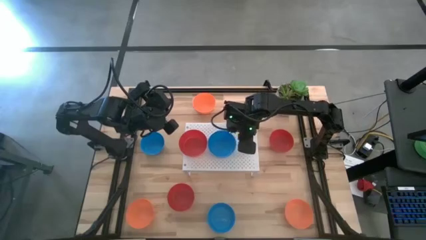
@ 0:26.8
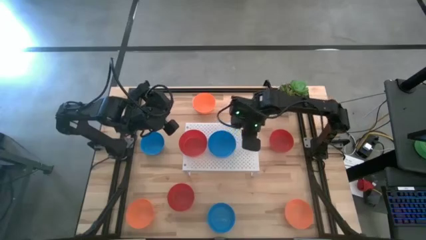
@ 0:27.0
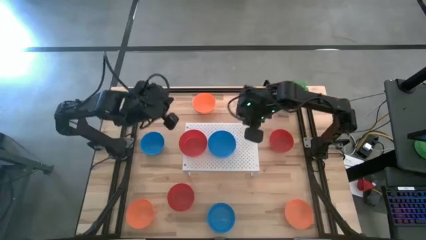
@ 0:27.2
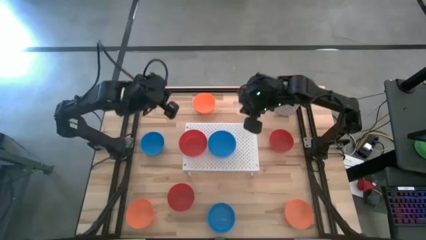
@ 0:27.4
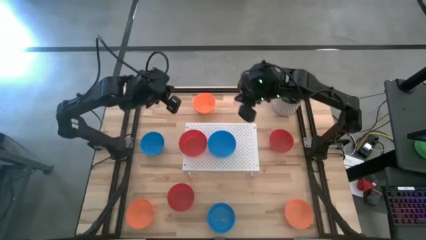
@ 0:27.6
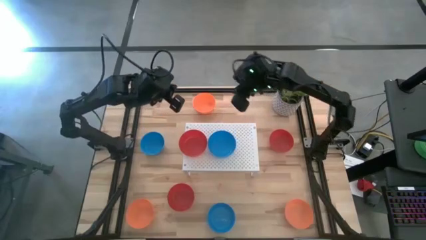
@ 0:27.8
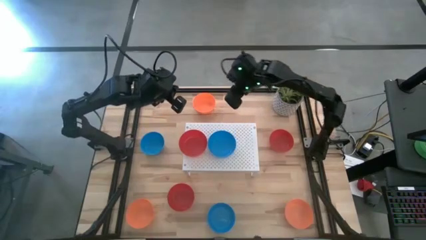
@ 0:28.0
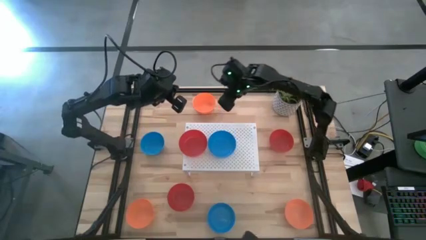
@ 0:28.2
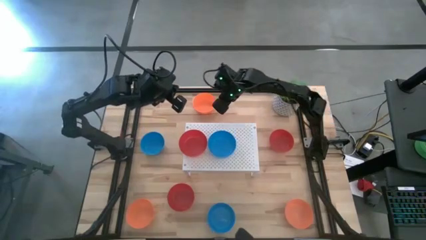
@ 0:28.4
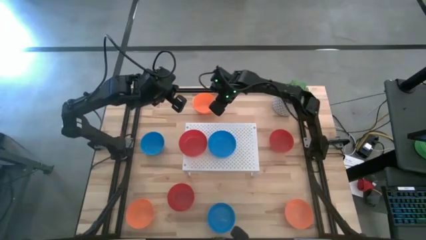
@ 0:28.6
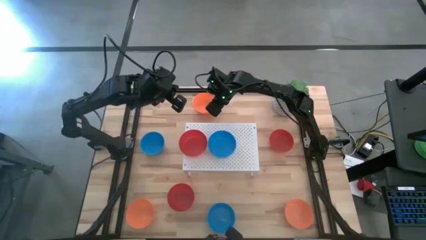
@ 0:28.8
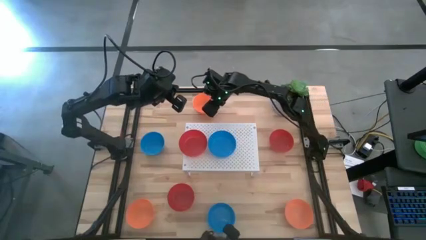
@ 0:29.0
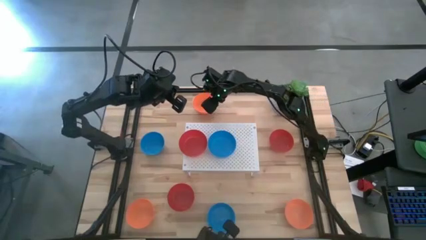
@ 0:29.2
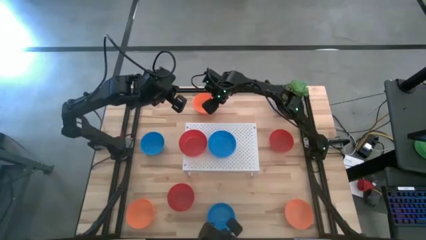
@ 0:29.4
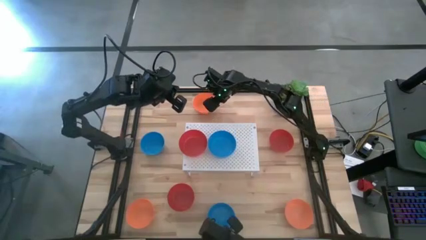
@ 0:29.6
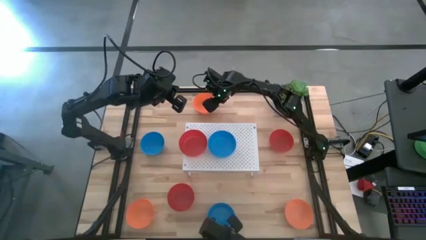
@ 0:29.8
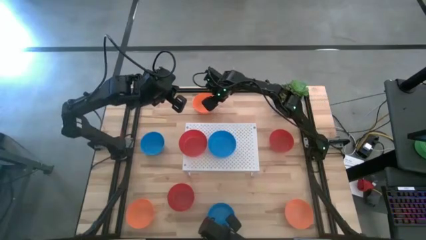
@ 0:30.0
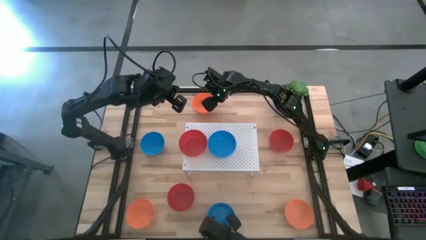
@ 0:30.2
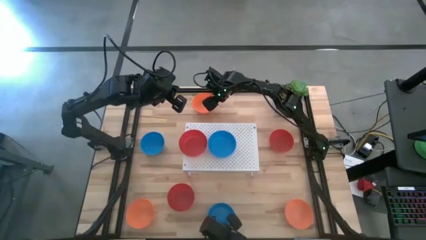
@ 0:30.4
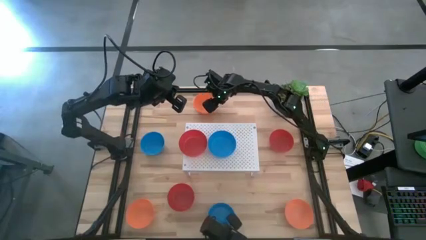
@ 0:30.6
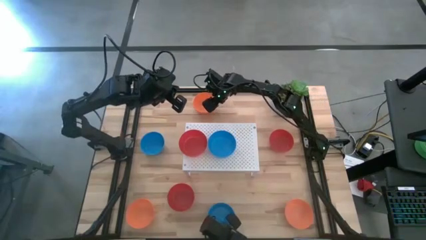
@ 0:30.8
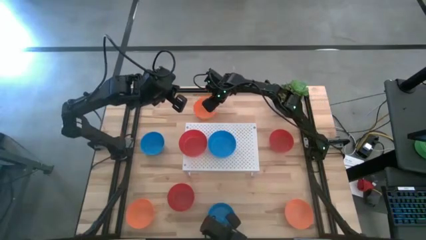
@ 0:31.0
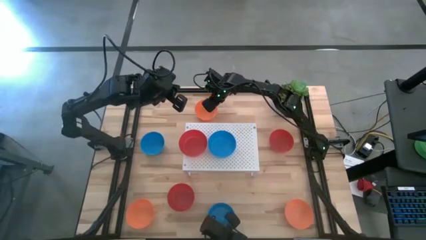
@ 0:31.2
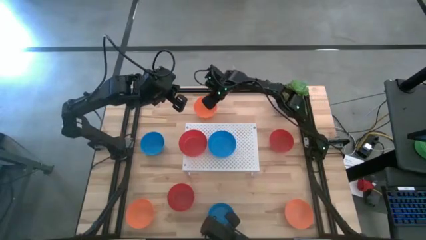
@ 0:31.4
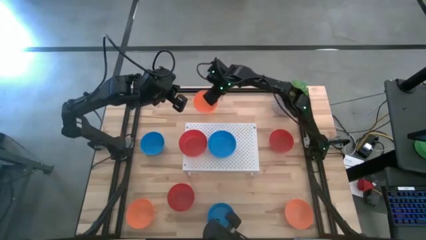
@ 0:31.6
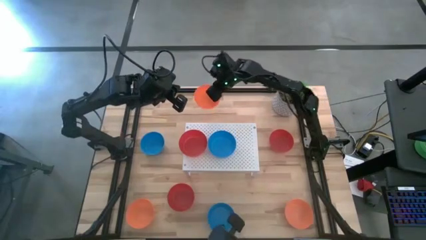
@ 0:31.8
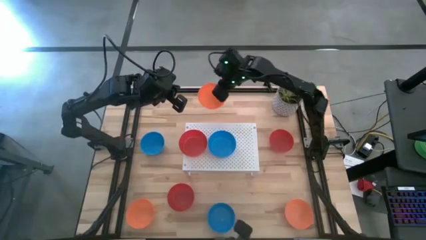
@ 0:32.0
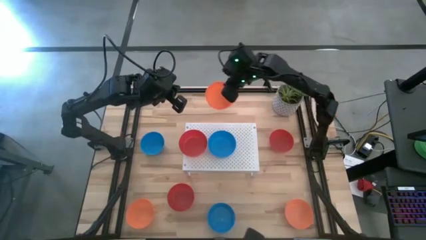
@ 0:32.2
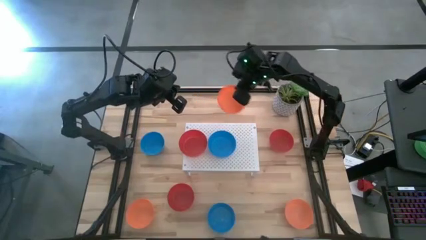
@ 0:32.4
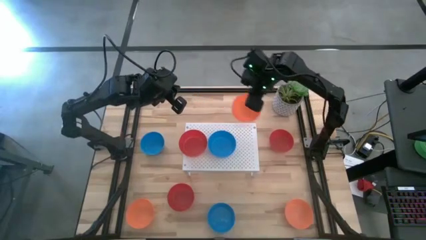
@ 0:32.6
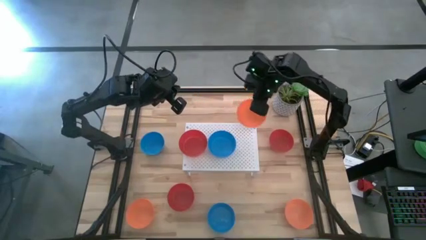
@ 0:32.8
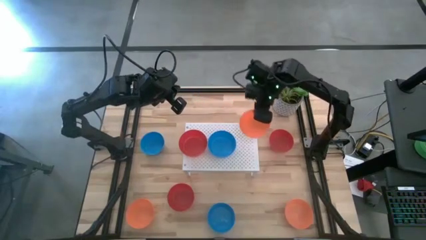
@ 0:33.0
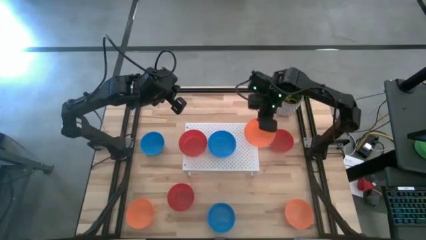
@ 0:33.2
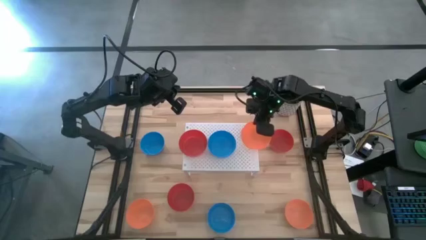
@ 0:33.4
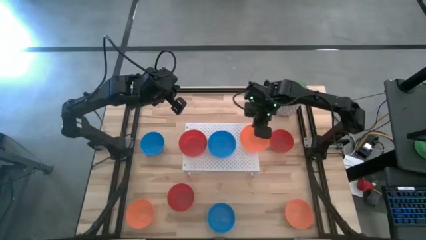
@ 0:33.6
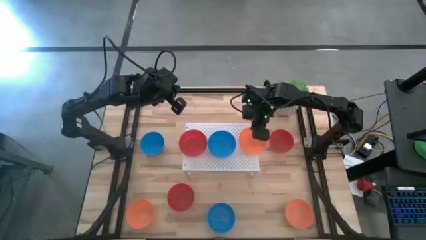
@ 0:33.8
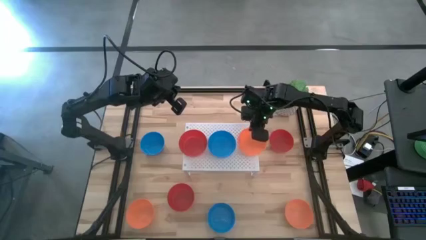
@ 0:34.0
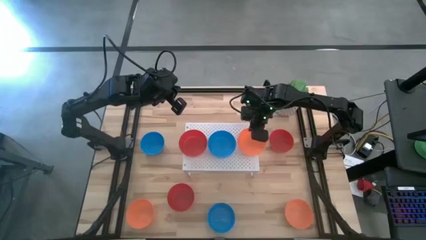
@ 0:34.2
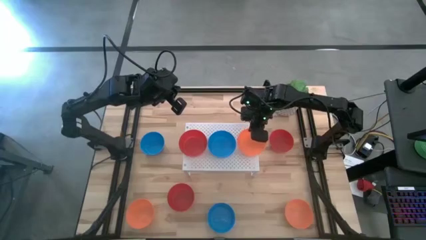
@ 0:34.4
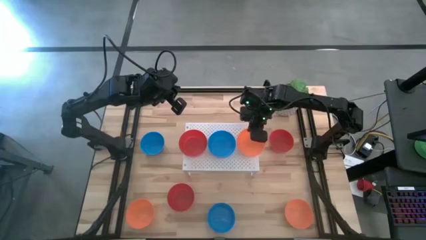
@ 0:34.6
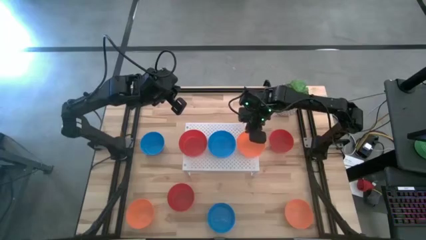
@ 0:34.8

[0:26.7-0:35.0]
Task: Pick & Place Mini bowls
Put the top orange bowl on the shelf

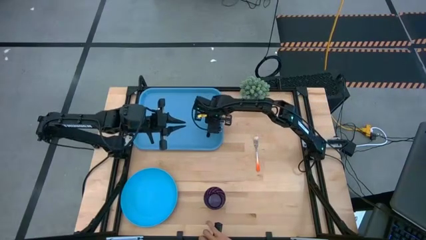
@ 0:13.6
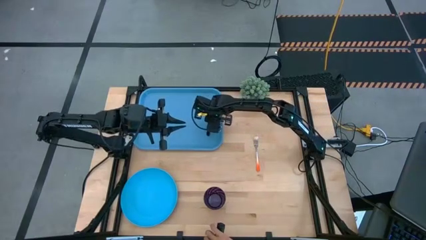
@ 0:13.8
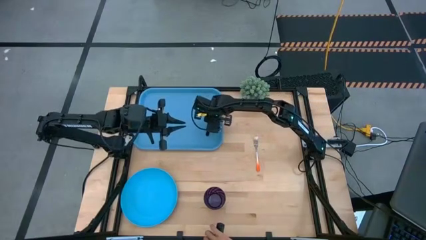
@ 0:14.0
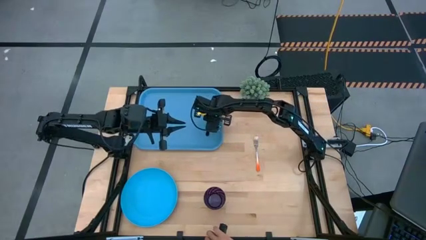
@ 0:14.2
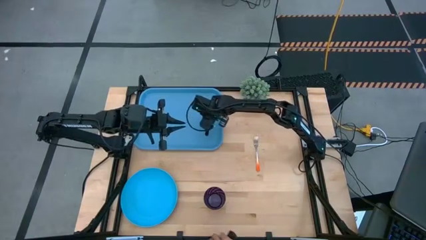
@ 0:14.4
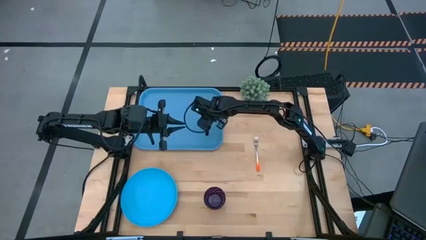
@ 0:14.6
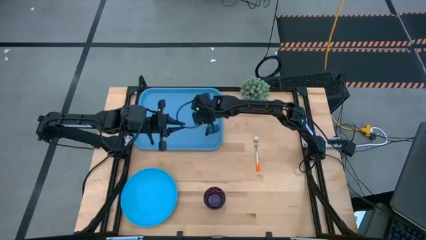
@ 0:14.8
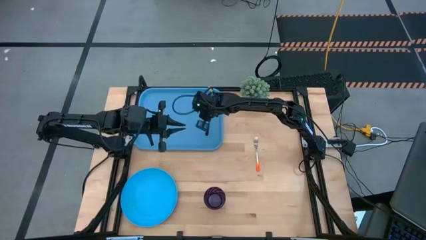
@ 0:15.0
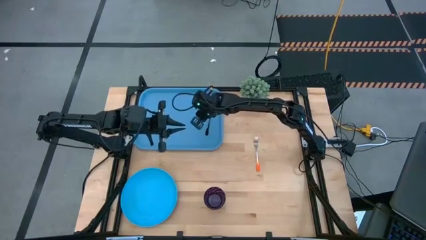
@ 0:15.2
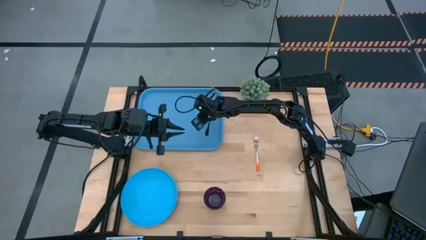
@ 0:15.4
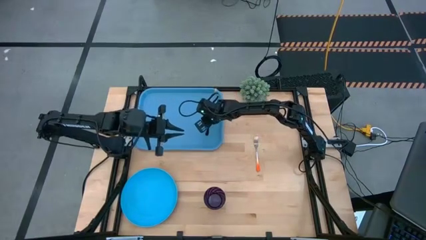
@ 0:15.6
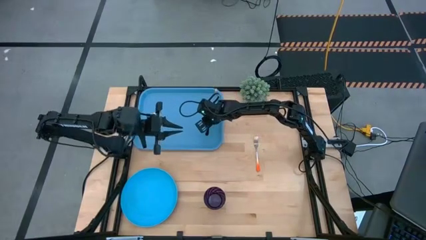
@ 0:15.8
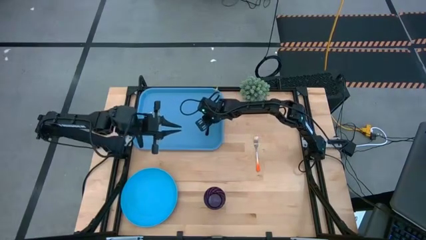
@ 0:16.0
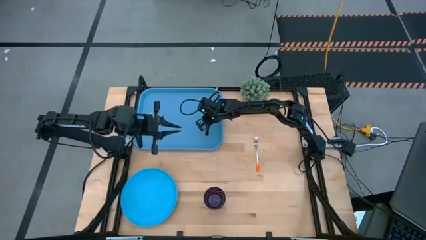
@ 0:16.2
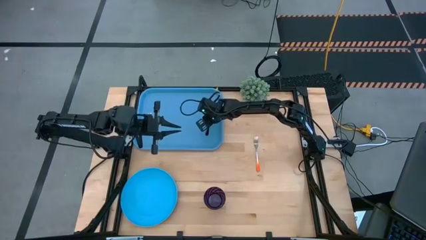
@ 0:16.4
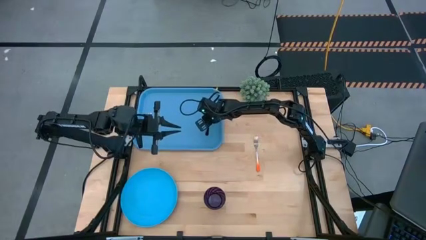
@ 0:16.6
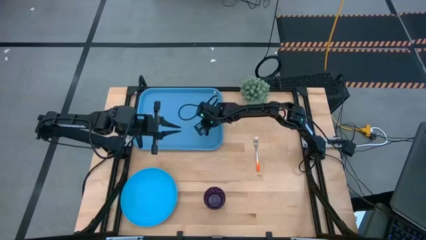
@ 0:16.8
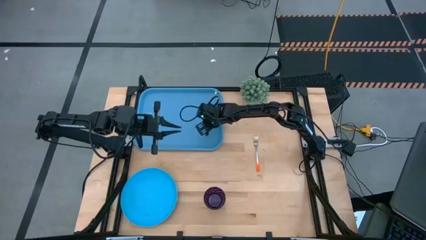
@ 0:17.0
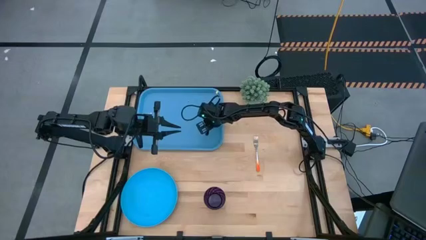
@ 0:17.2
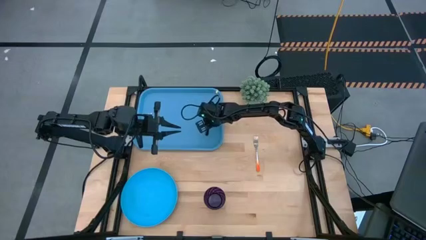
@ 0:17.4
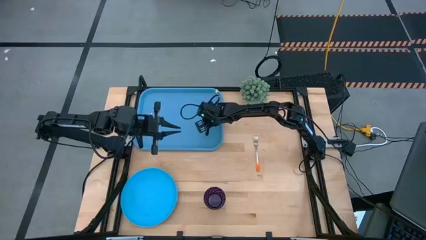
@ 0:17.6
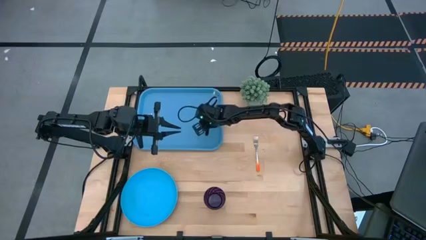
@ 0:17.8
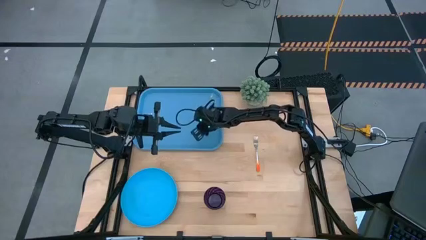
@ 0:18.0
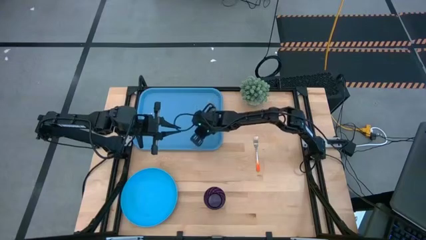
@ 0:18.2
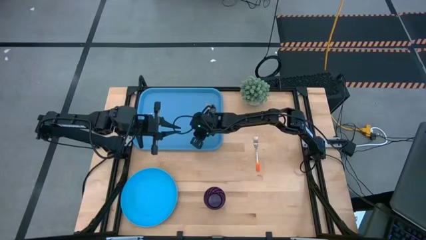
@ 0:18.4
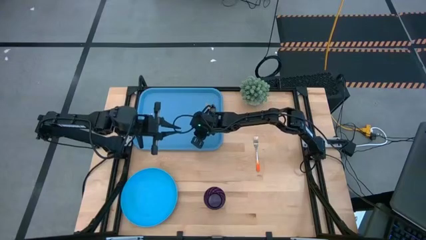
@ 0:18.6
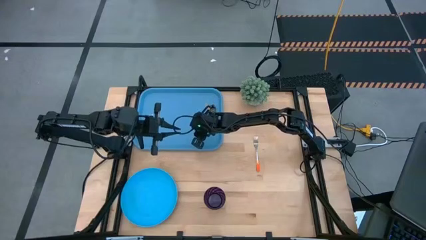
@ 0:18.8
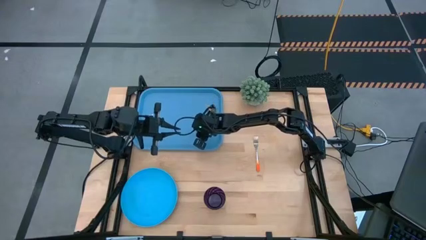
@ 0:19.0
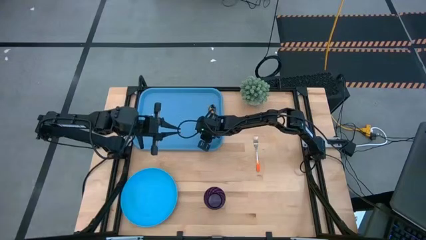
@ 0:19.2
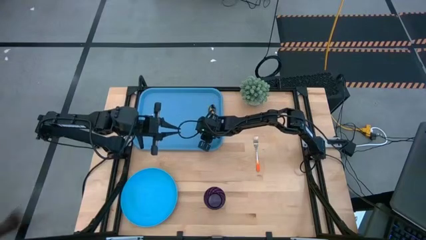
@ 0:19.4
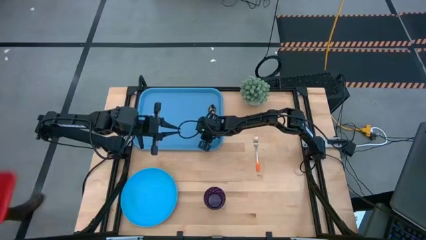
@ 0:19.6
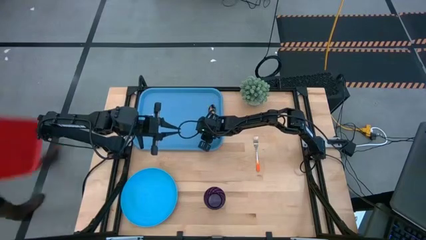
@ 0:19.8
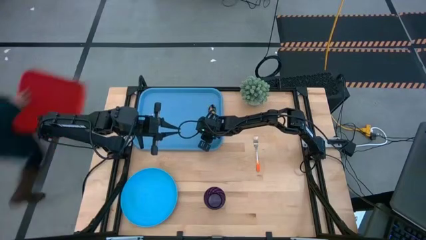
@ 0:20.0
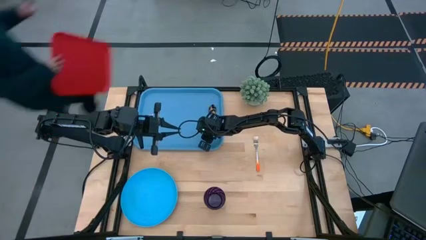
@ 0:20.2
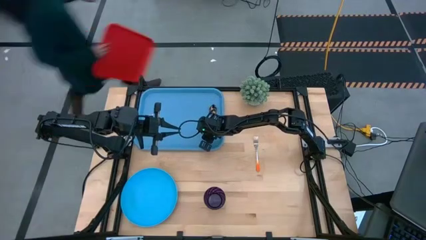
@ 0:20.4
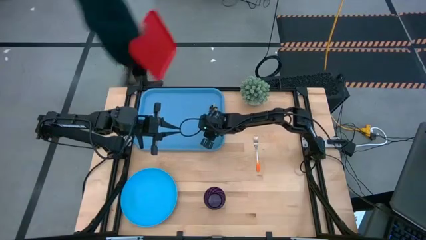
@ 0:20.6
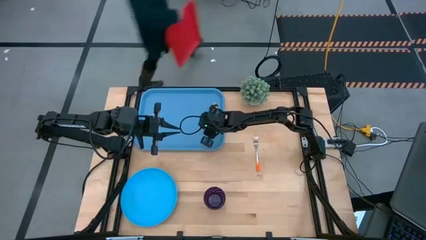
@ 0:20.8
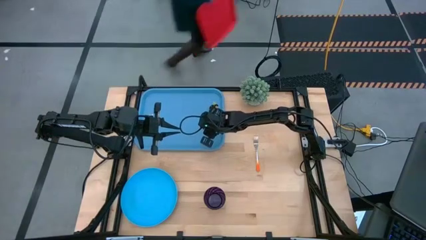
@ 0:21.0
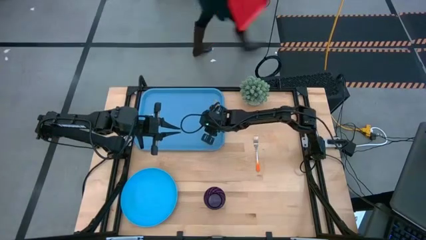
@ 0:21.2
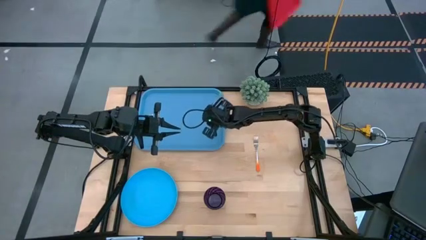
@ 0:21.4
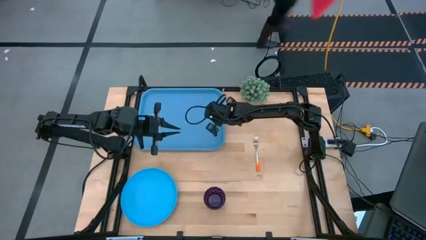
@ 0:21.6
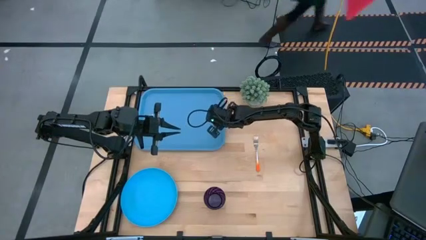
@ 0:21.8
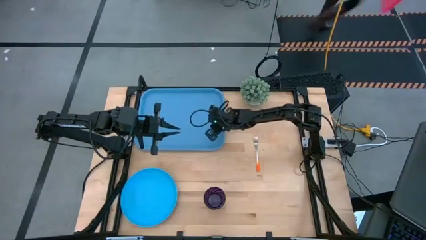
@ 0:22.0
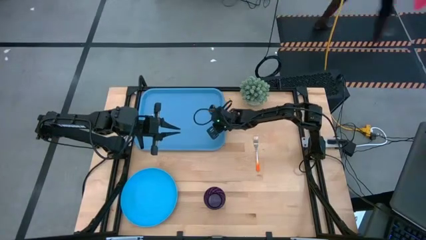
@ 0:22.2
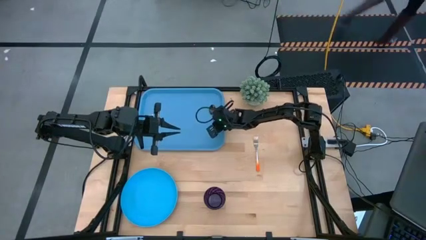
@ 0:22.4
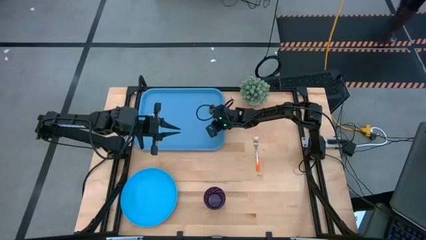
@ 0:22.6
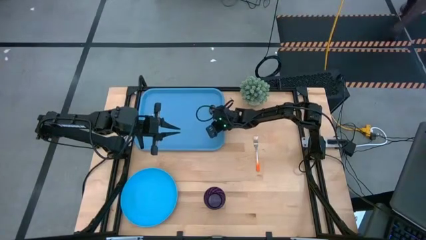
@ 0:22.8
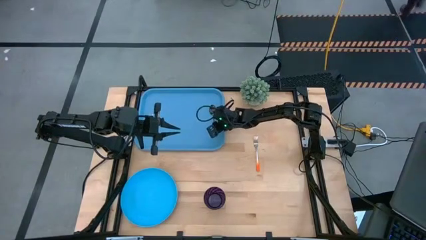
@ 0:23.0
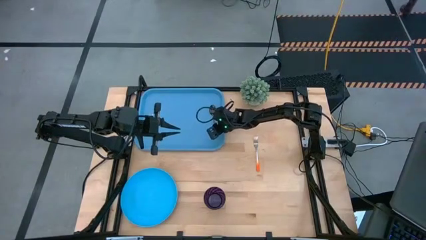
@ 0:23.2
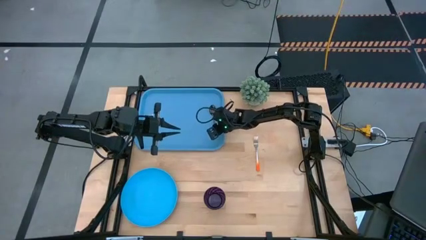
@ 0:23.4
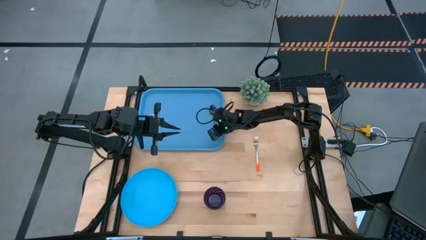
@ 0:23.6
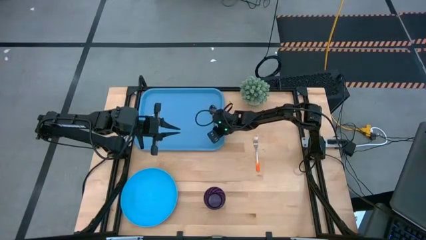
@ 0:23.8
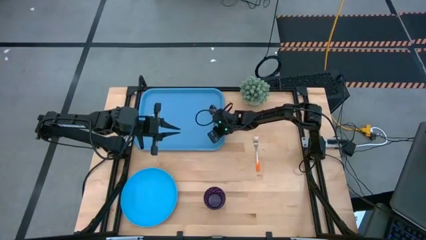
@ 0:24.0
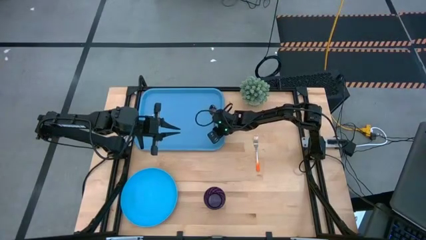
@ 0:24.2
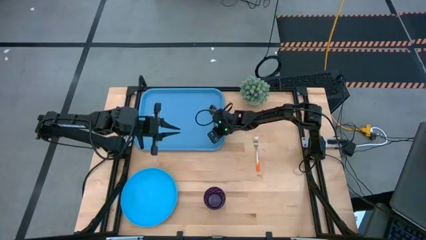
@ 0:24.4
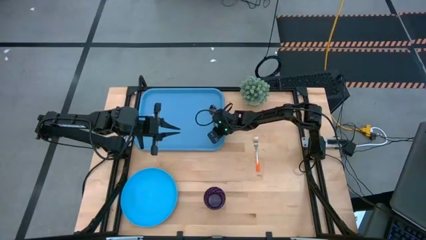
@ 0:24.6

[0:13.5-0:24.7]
Task: Pick and place plate/cup/fork/spoon on tray
Put the black spoon onto the right side of the blue plastic serving tray
